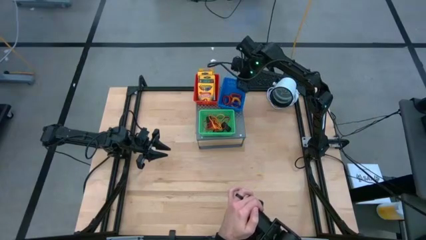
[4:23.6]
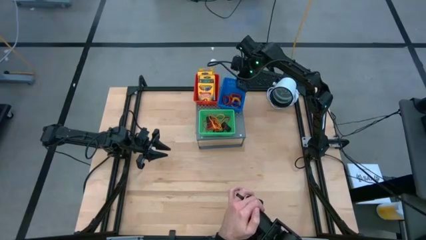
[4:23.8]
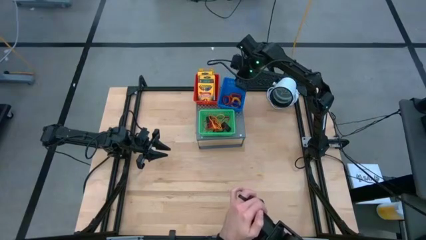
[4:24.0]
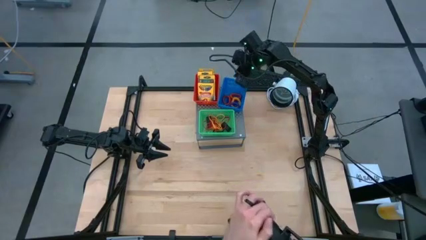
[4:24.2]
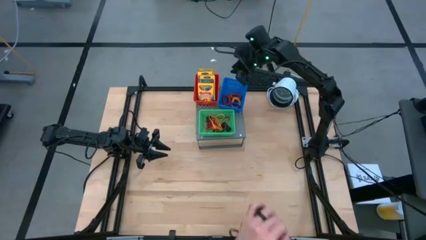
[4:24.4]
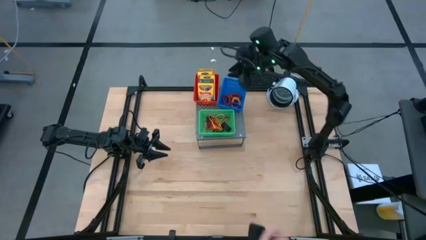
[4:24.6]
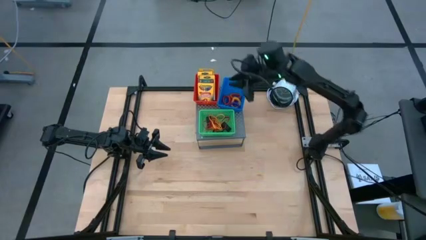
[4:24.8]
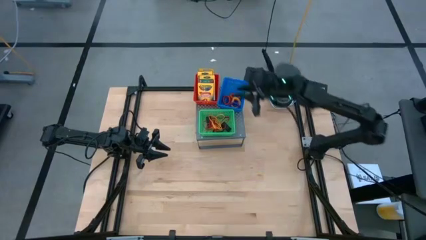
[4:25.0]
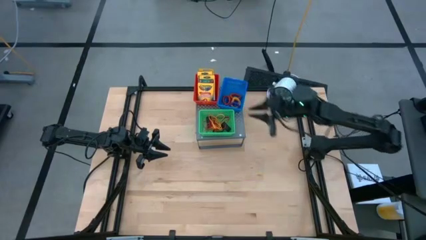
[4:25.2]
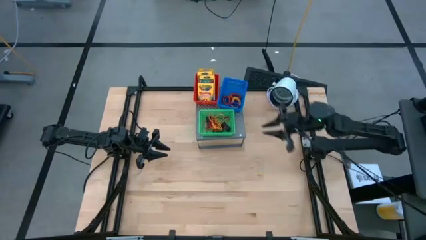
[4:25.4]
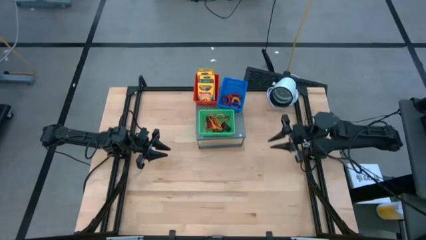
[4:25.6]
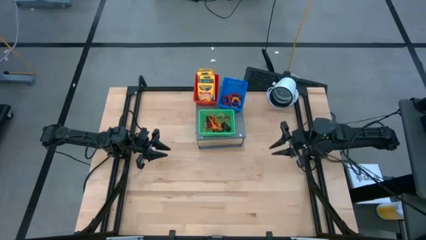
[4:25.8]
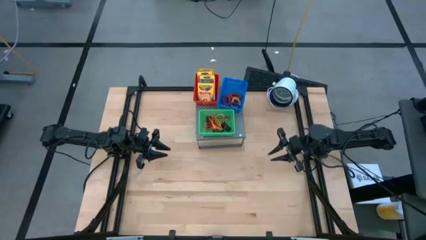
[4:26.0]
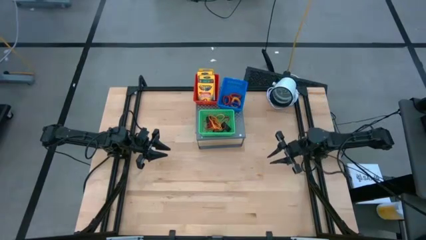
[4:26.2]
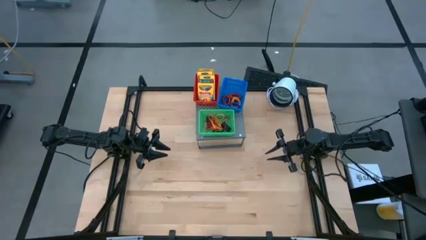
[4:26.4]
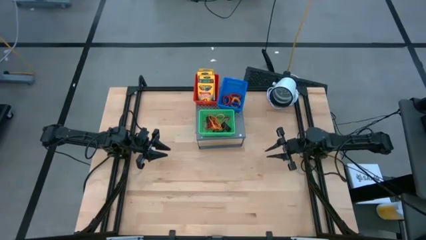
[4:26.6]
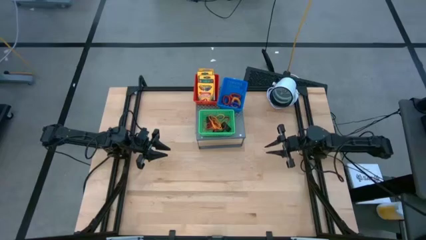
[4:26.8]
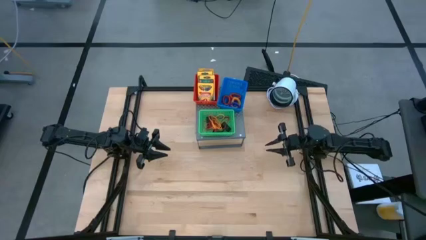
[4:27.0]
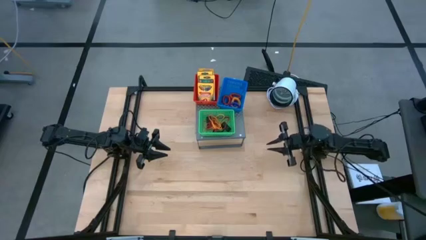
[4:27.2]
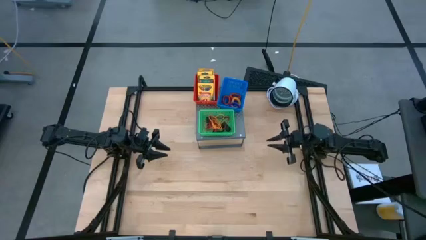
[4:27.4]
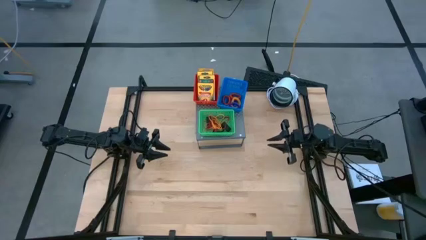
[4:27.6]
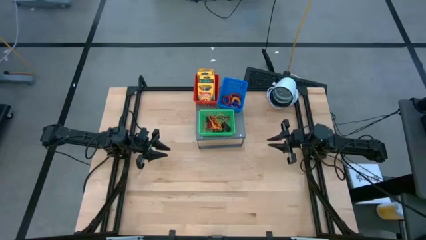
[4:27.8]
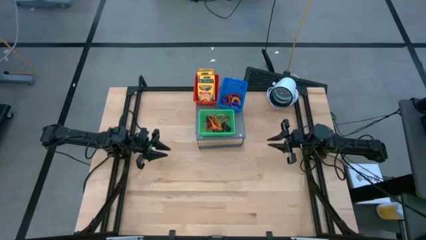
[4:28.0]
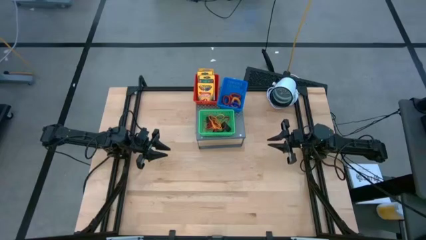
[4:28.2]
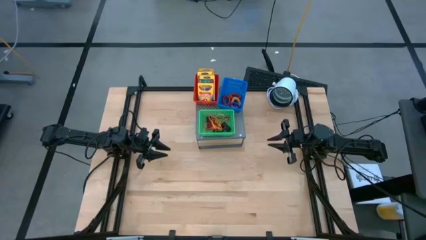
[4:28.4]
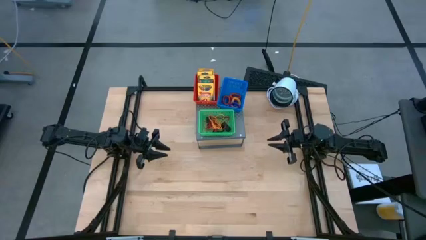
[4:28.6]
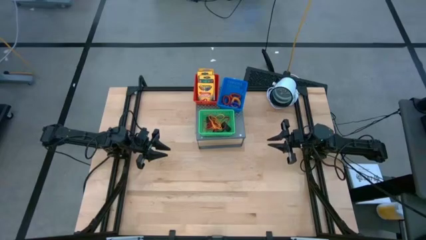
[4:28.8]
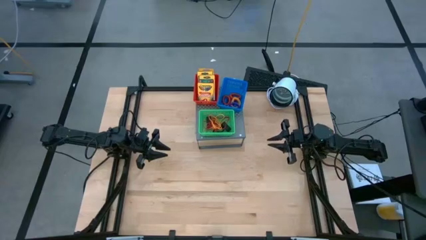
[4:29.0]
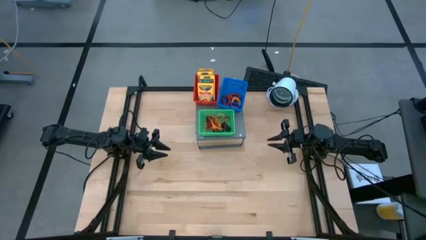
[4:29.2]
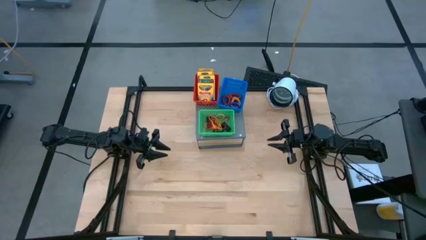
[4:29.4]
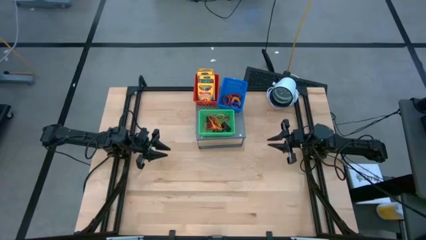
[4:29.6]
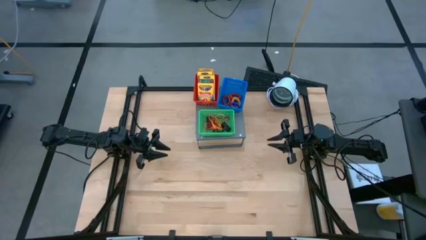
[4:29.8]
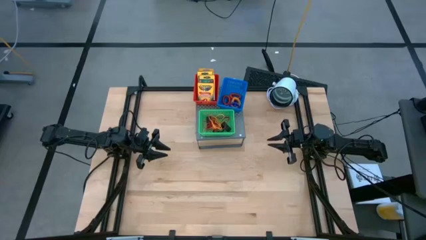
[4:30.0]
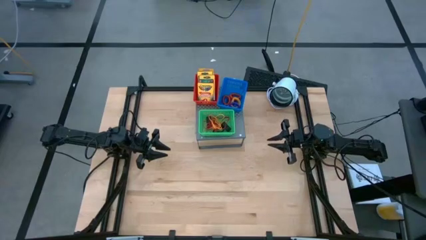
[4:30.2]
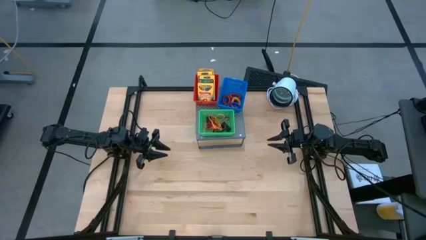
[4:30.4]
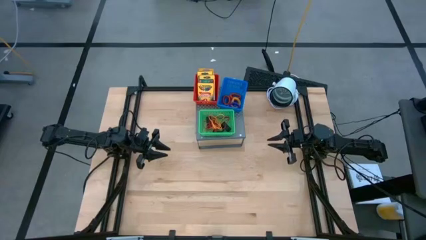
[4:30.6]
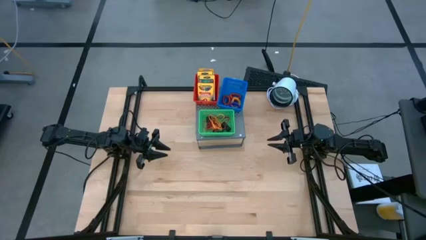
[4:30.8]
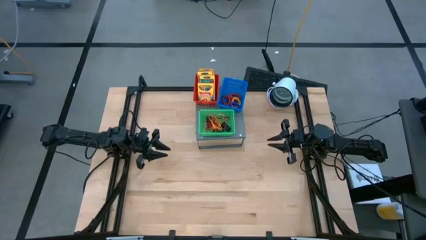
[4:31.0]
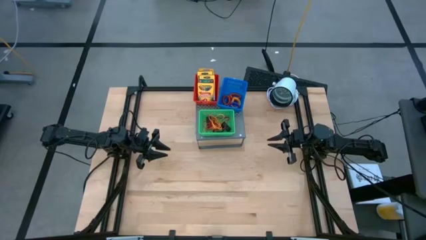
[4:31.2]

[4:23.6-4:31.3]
Task: Pick & Place Office Desk Supplies
Return to Home Position

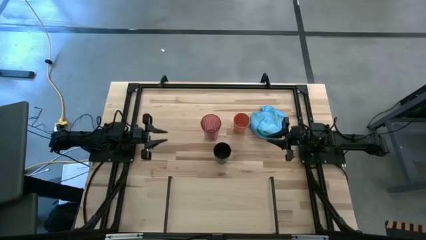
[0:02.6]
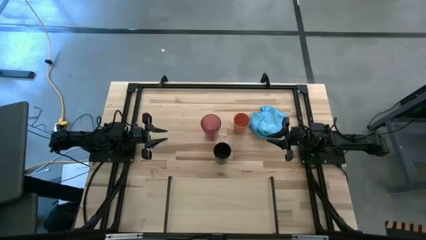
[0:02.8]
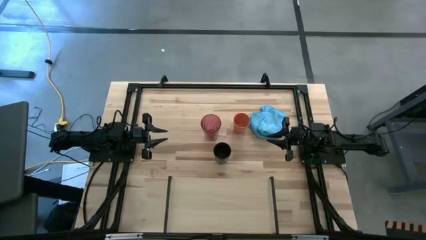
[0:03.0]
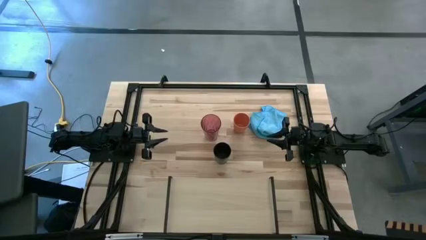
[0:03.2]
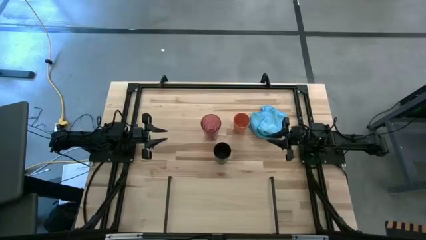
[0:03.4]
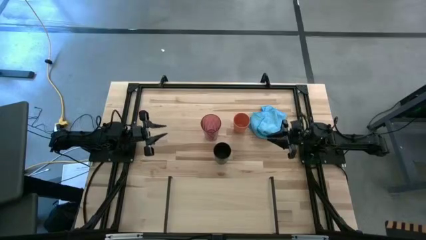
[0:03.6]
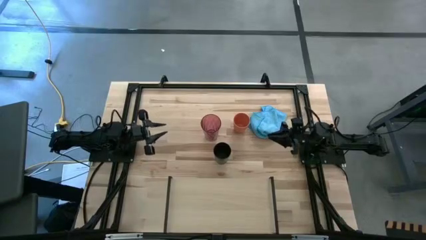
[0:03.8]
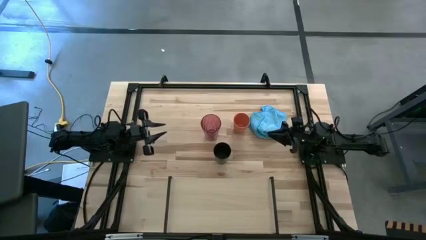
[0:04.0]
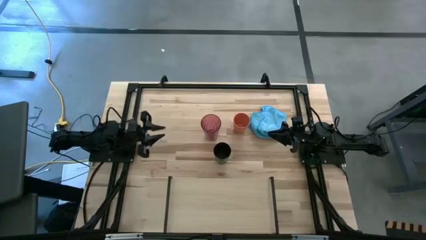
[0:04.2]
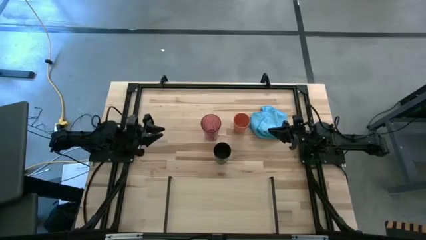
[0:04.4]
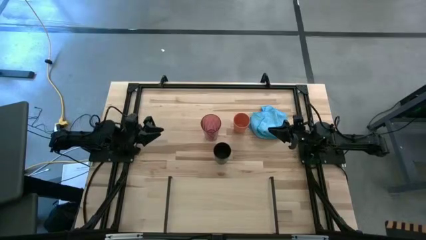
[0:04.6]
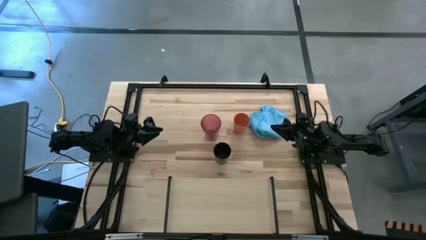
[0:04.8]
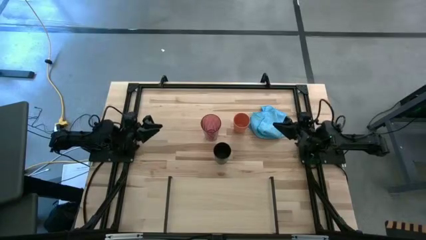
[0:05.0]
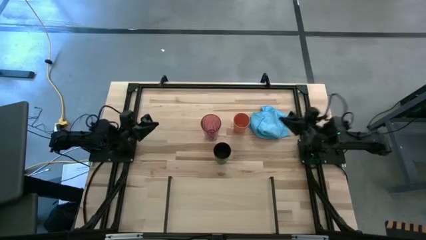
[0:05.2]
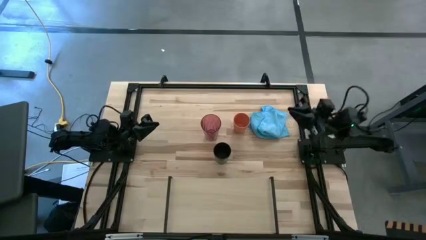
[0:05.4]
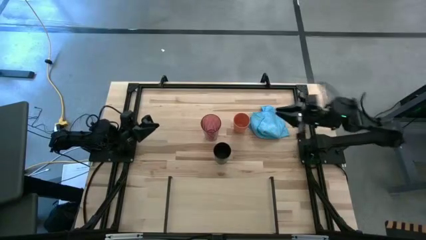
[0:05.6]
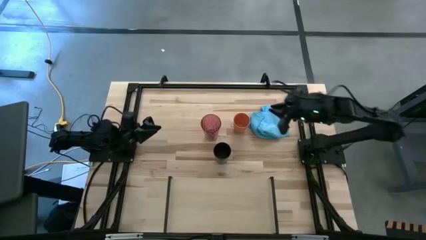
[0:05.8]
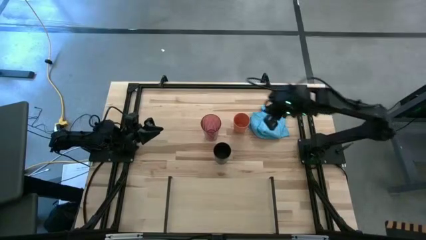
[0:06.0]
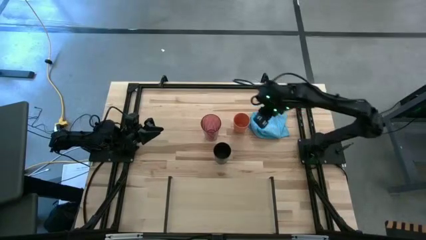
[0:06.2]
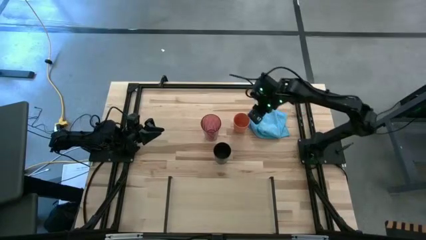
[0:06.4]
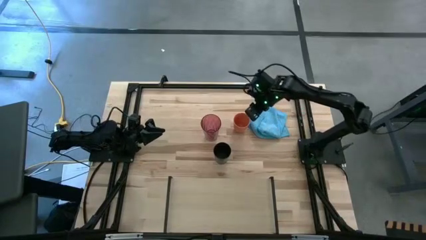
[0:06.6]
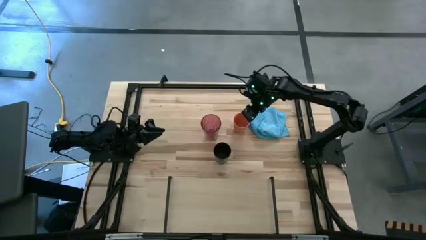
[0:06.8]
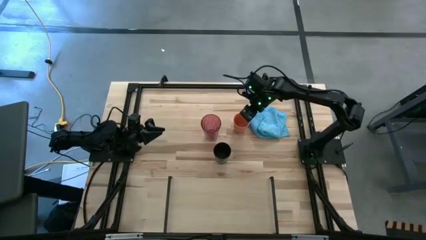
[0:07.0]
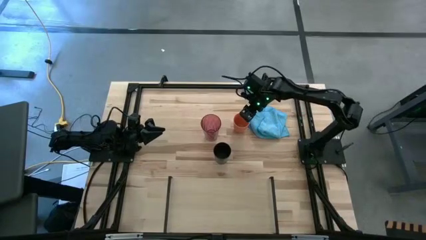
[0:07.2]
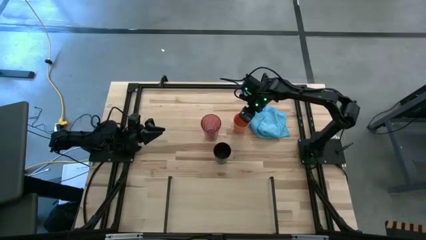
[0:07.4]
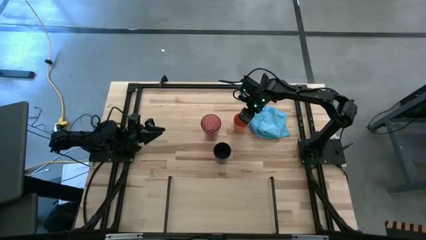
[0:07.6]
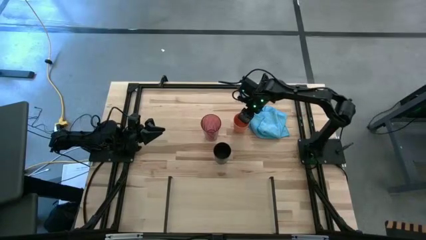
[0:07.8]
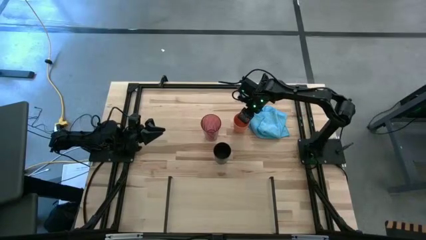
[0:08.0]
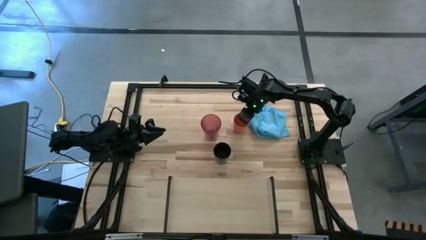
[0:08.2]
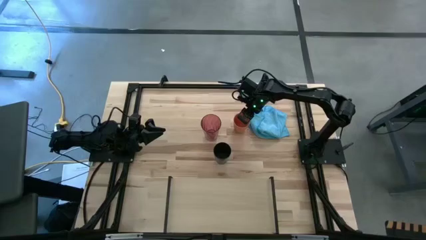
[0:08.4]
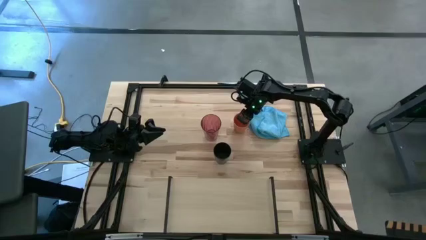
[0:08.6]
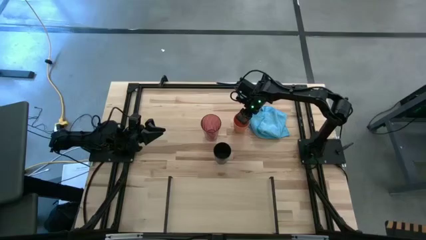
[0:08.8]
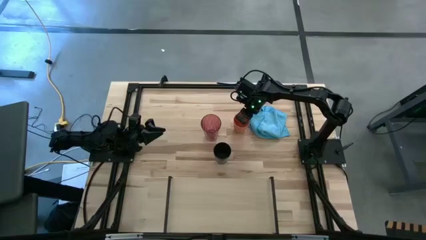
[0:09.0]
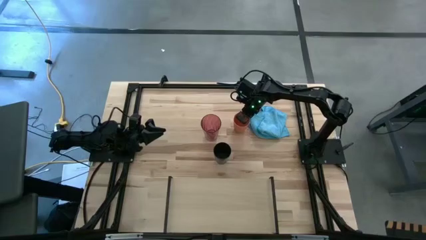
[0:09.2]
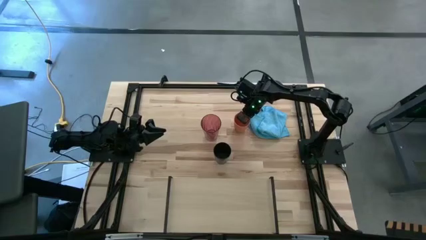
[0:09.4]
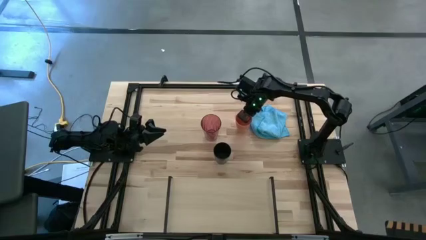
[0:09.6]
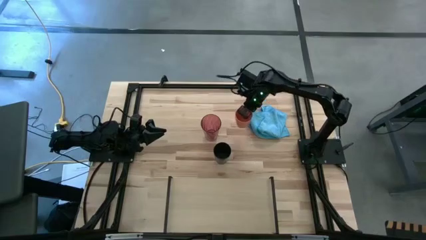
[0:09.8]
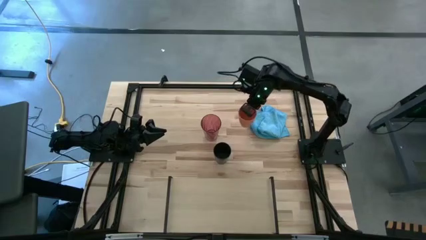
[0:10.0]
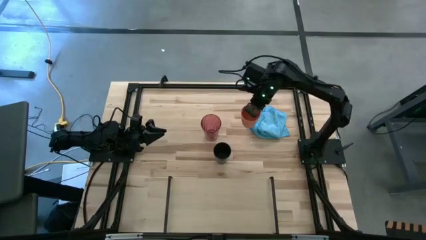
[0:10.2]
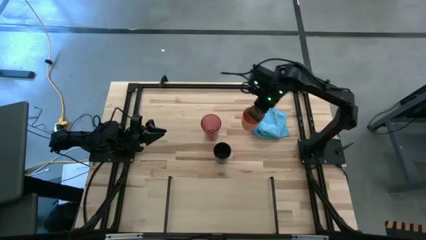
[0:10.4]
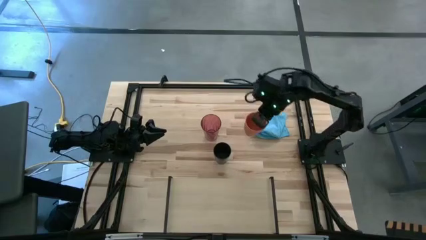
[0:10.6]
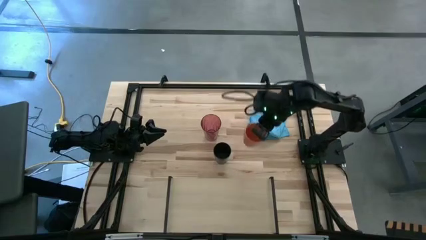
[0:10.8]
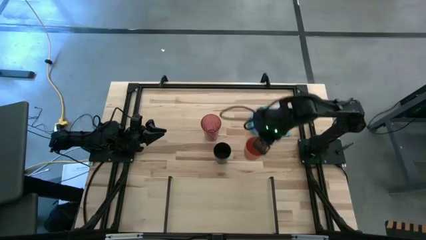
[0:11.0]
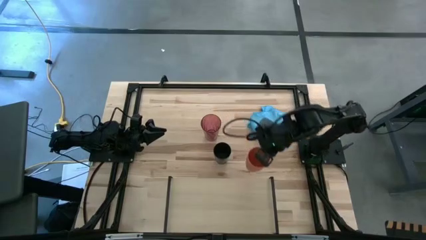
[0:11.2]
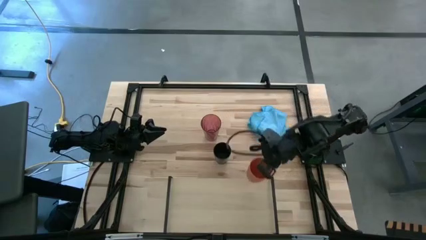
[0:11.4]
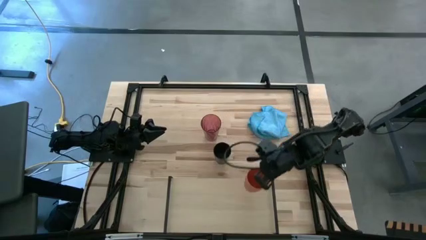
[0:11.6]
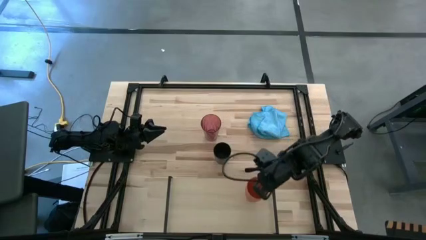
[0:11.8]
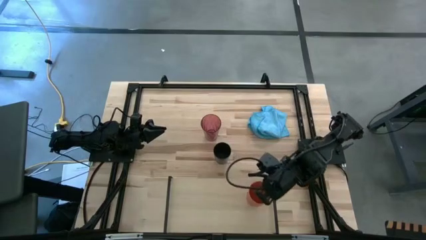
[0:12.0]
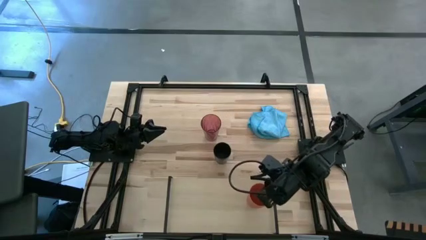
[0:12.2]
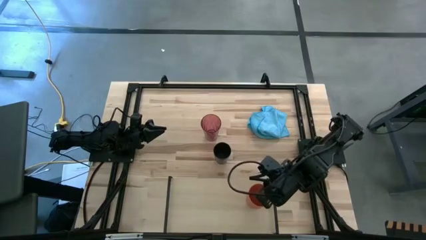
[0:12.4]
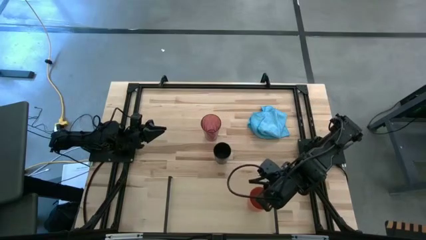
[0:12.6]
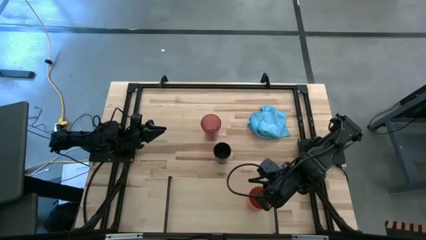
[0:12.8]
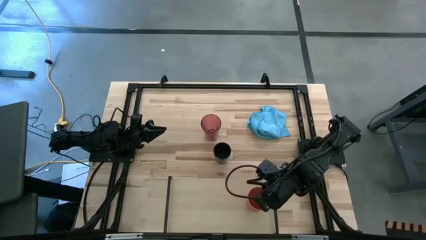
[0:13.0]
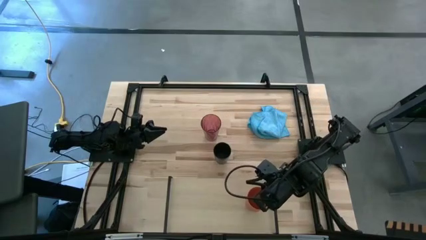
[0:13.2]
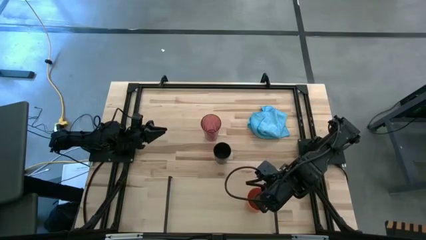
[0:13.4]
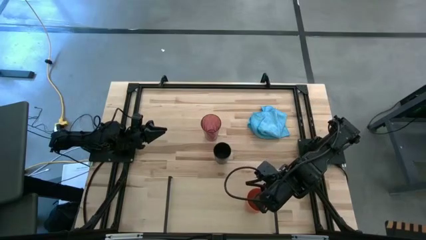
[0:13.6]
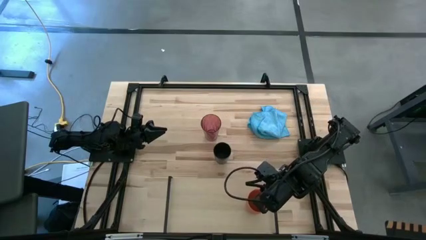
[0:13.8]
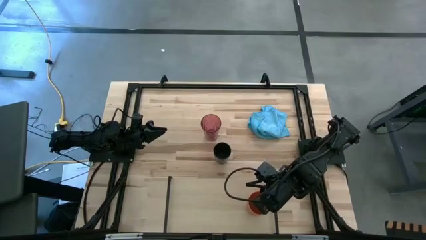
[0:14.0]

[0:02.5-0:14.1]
Task: Stack small to large cups/mugs on shelf
Put the orange cup on the shelf
